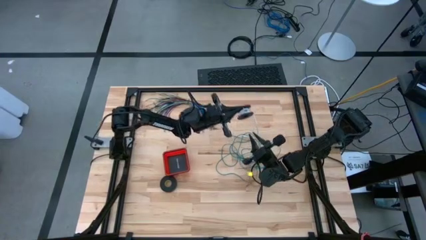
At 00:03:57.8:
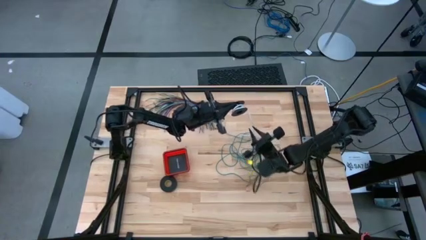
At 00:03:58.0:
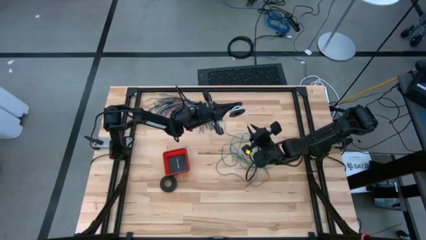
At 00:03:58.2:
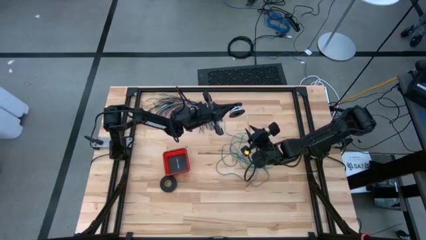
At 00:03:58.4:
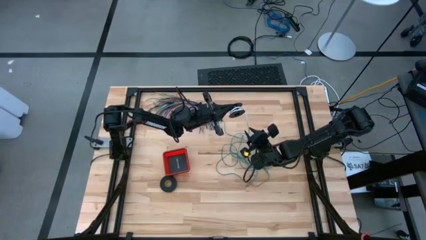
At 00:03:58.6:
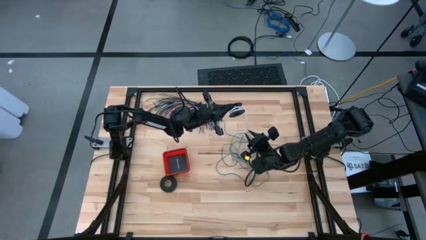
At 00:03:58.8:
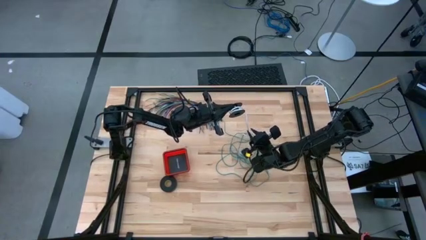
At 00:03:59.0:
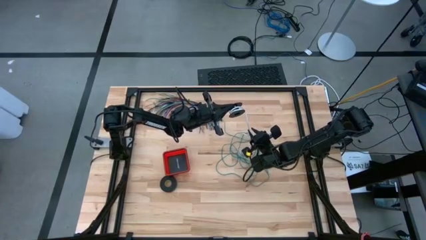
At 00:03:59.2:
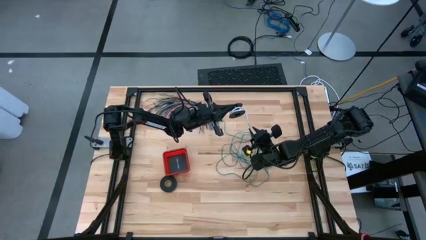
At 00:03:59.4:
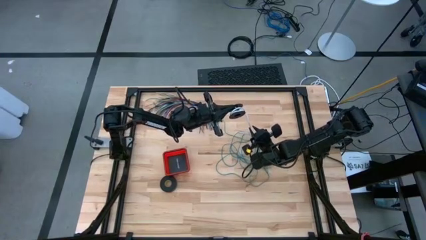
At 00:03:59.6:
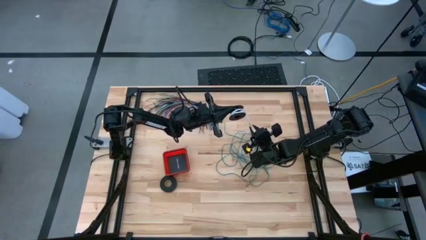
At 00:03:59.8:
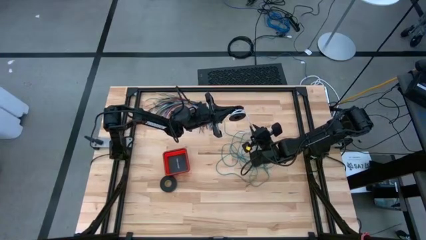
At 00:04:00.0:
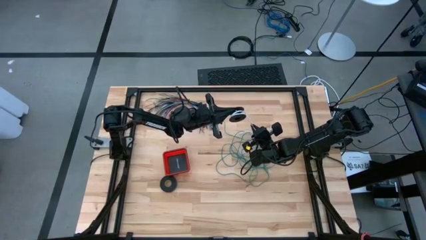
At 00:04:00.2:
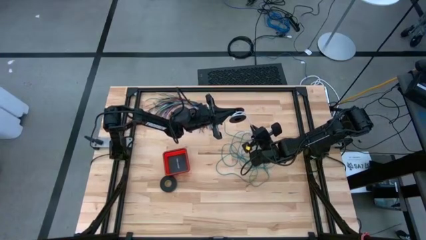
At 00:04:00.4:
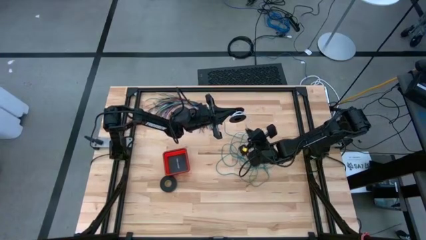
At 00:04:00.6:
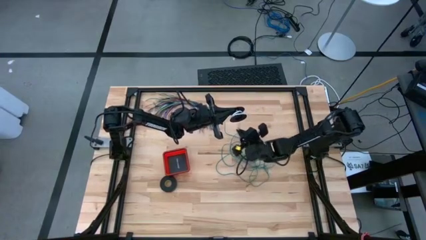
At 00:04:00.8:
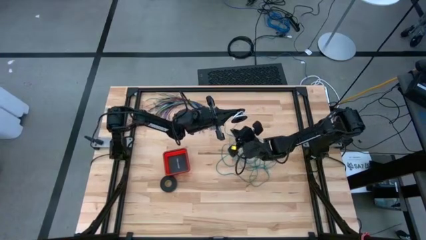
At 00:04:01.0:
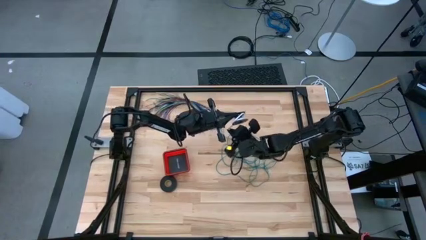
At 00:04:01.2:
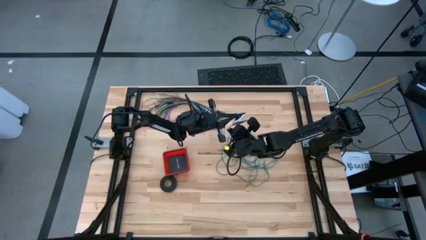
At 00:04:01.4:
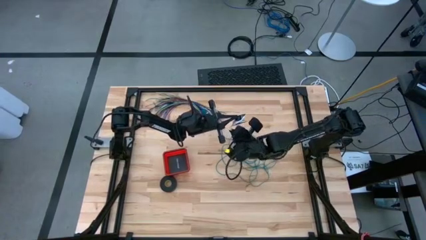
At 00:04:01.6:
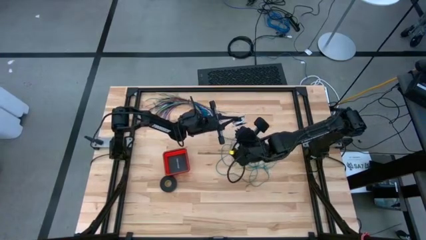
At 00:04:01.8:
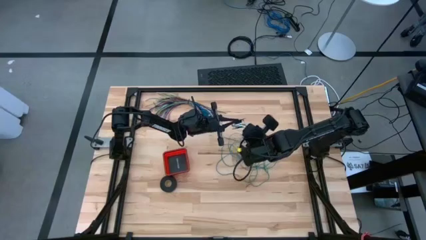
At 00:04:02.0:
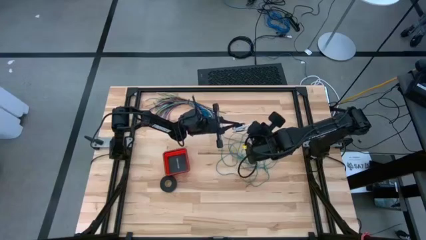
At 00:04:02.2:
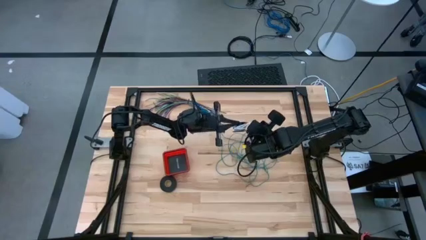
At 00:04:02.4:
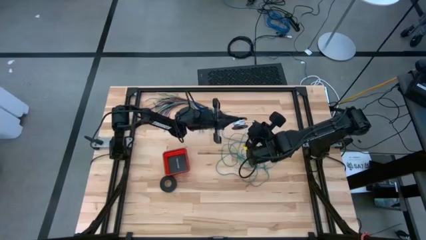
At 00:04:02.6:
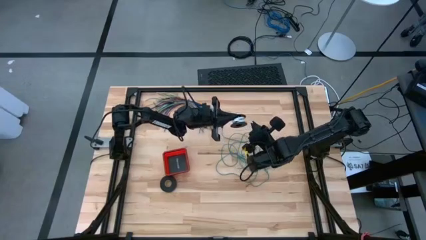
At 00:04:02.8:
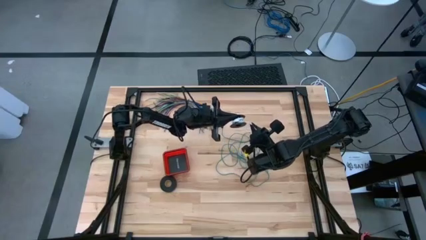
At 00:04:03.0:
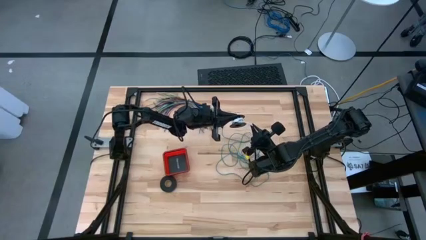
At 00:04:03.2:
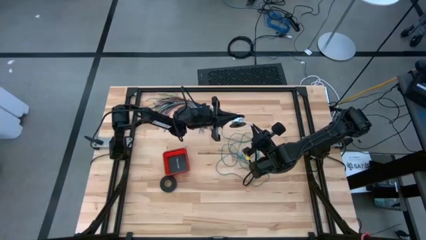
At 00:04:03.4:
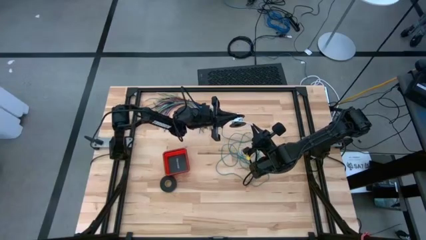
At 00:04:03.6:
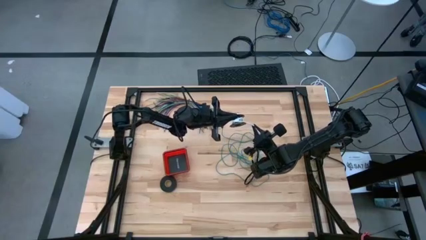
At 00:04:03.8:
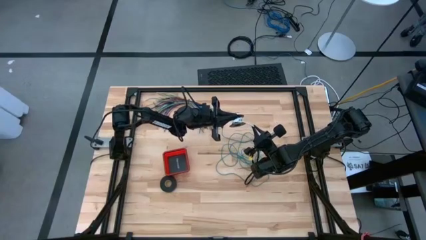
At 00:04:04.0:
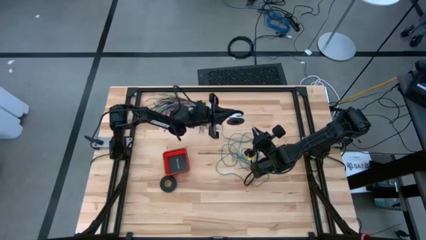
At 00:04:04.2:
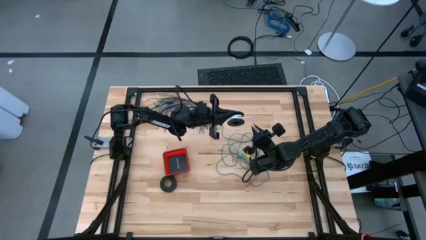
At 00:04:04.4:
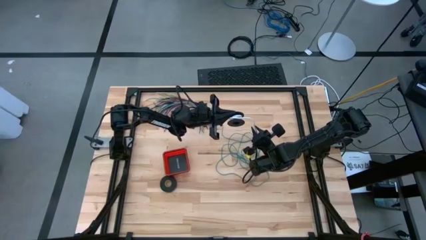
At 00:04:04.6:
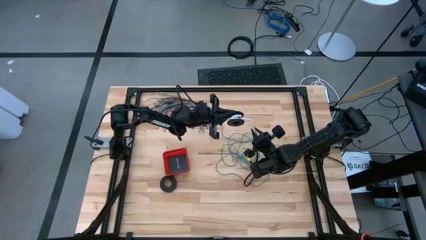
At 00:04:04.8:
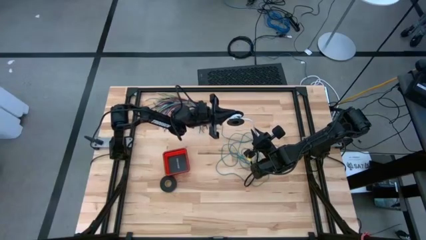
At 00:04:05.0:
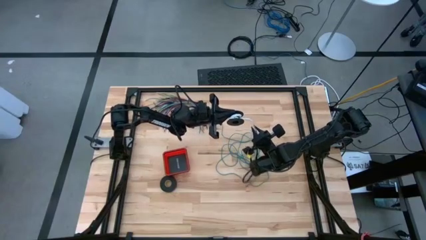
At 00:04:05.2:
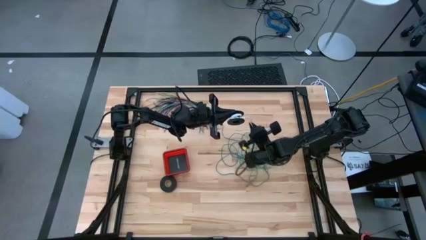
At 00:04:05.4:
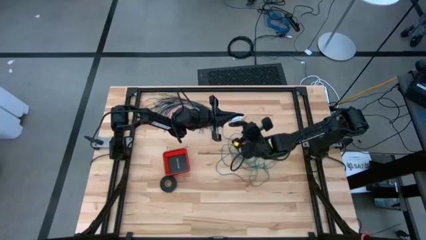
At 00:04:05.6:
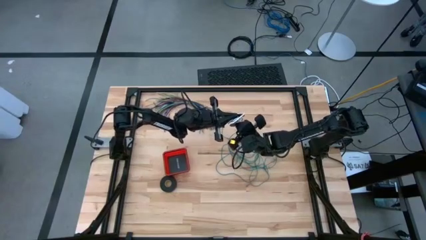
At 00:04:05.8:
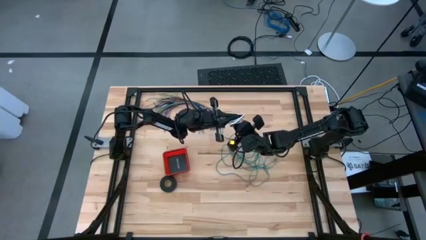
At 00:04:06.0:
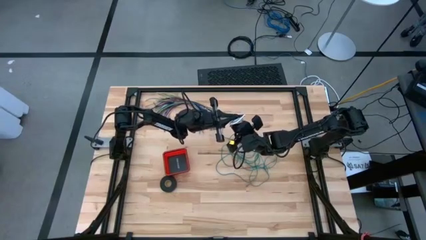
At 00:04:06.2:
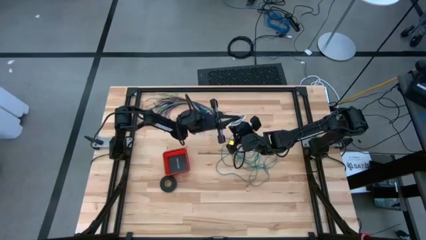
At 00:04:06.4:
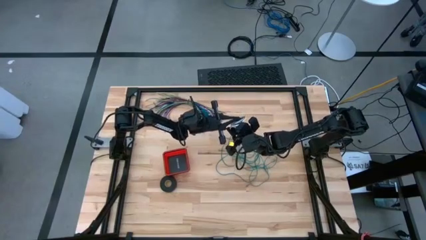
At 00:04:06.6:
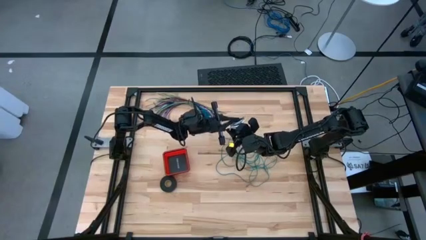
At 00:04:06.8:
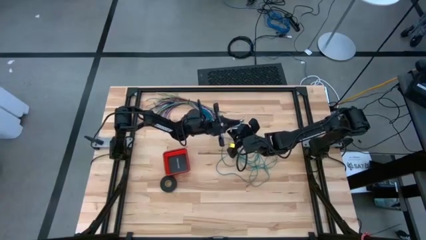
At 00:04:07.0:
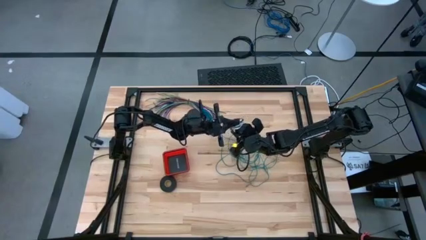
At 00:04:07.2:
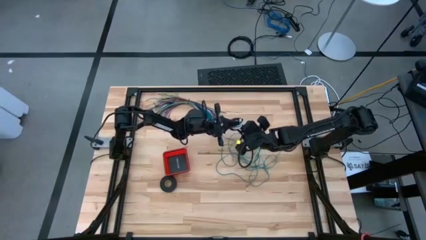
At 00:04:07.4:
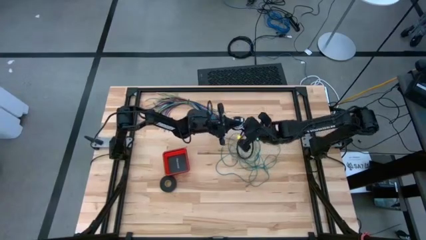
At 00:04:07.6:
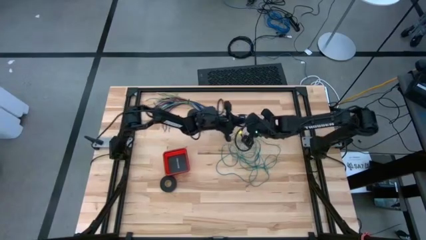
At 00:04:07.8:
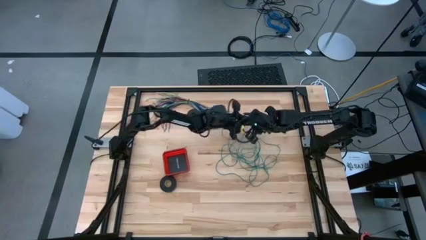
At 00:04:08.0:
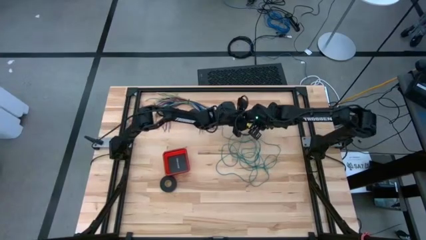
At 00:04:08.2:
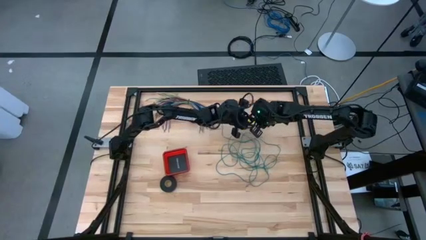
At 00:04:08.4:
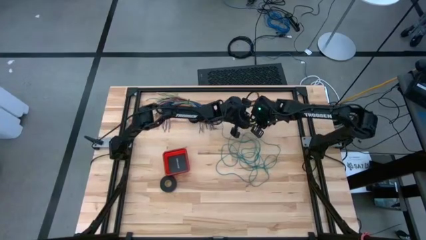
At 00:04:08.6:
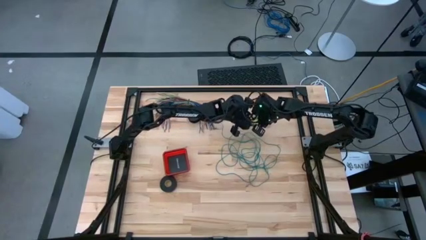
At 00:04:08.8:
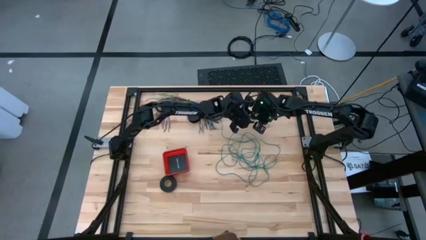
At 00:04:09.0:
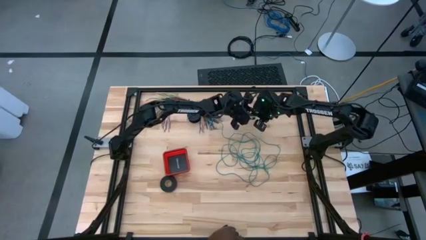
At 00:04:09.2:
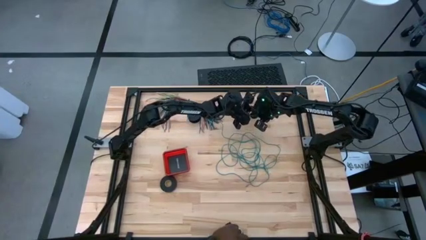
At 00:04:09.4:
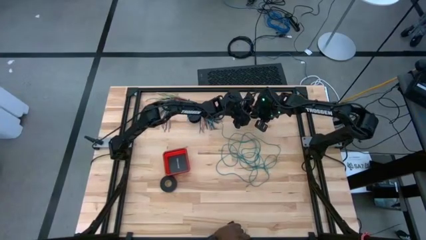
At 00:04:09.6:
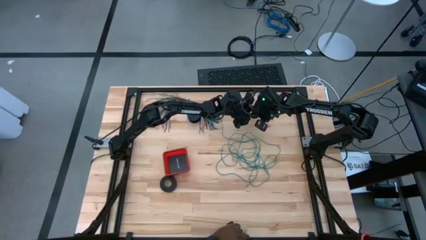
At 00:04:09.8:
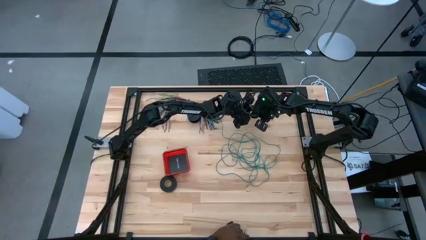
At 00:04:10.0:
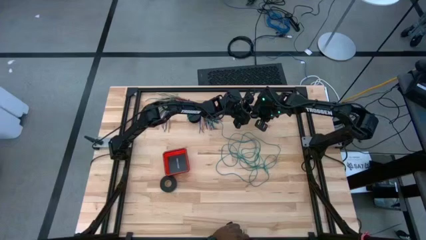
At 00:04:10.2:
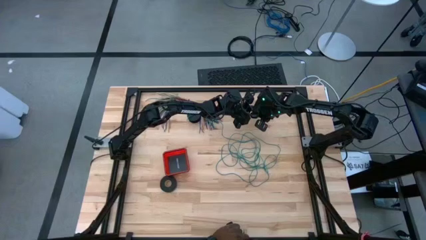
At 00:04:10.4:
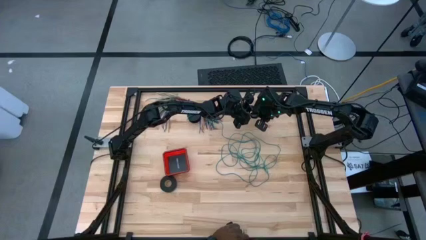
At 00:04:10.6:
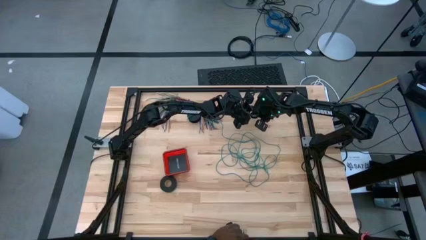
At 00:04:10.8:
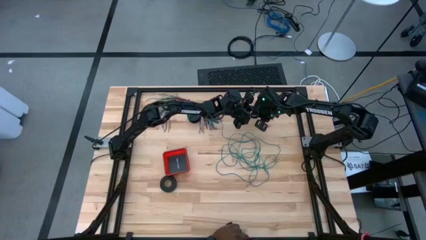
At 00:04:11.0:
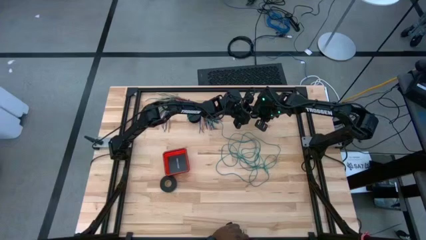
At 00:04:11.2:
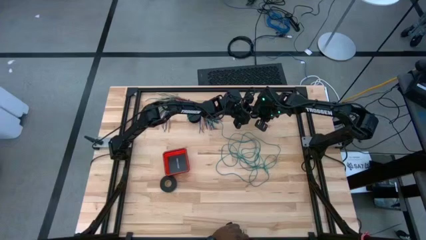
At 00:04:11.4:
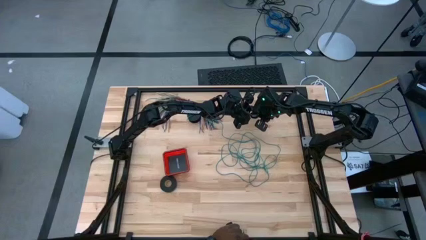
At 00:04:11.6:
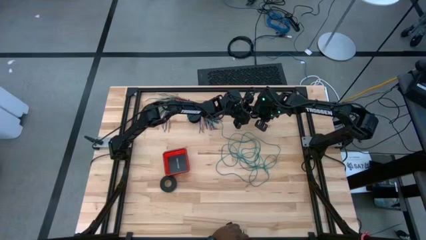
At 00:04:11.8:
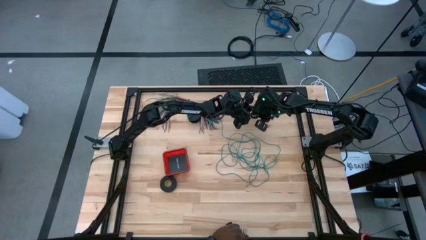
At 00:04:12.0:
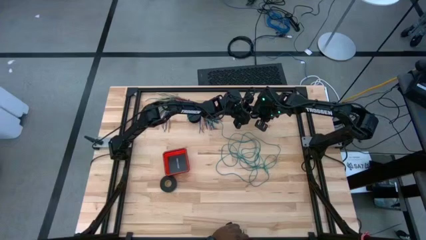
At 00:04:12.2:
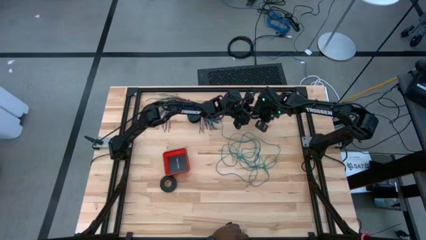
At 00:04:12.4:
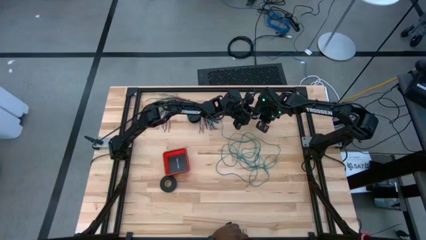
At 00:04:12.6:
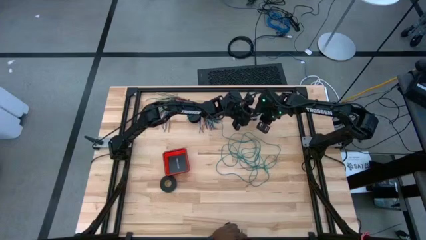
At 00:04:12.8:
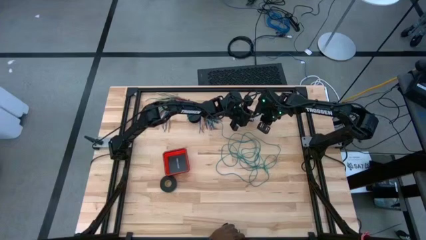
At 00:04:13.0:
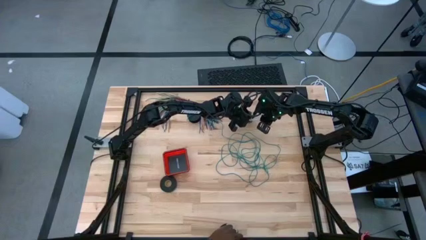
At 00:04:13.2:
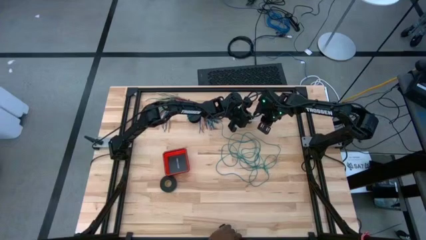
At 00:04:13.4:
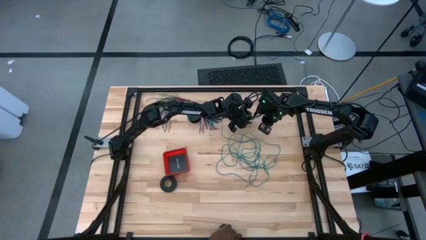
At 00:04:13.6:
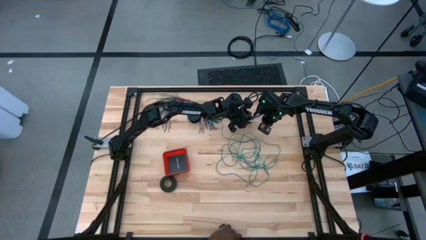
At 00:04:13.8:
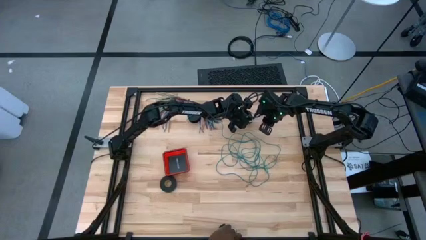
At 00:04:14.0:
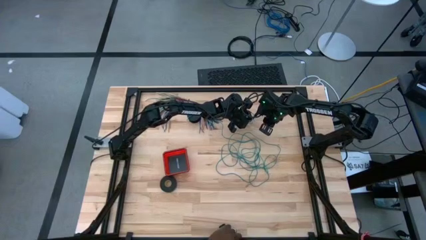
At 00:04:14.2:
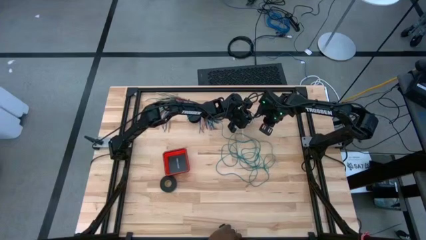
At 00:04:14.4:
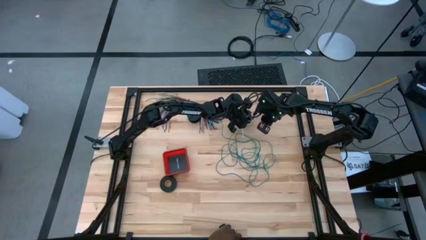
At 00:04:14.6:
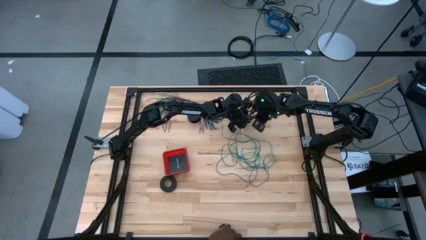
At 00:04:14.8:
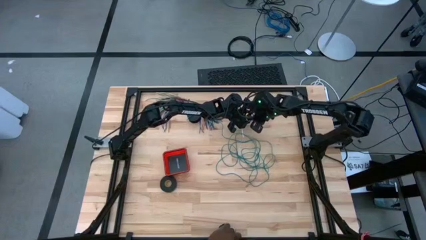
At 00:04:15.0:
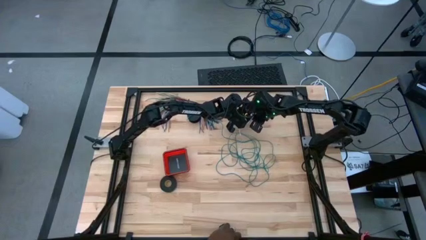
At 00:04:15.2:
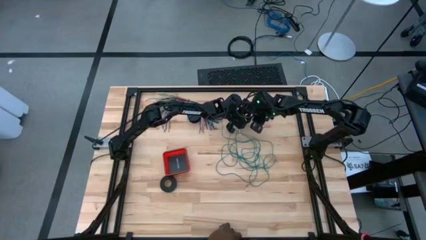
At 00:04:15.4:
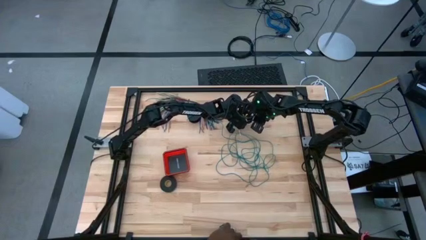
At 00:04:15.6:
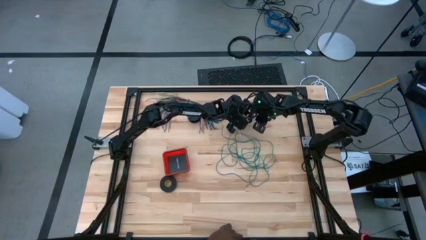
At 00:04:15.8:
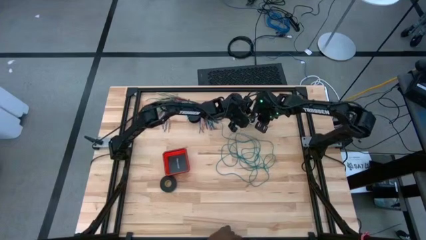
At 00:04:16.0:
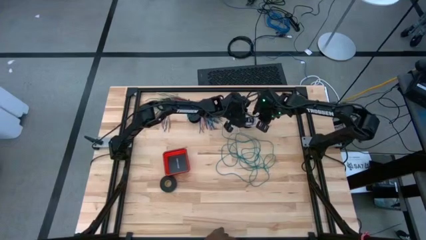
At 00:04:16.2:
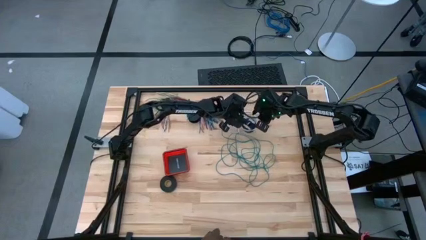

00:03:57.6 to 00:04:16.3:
Task: Coil cords
Coil the white wire onto the spool
